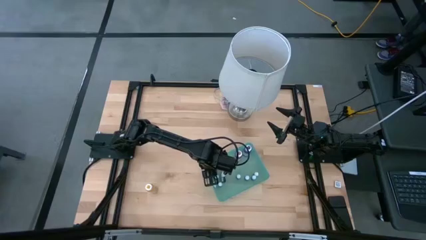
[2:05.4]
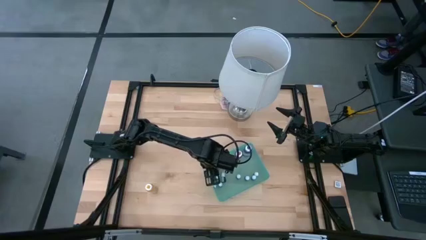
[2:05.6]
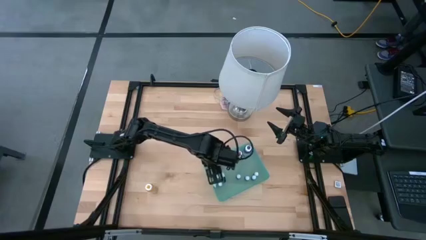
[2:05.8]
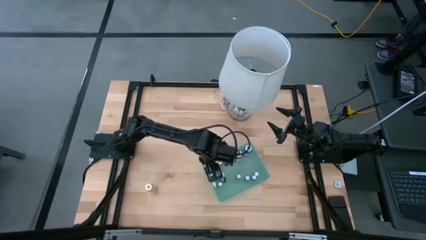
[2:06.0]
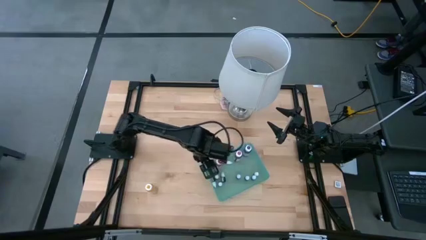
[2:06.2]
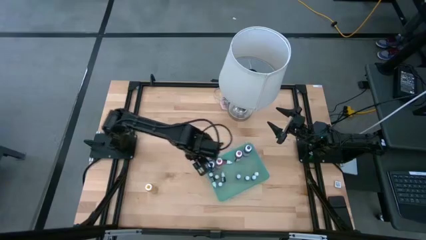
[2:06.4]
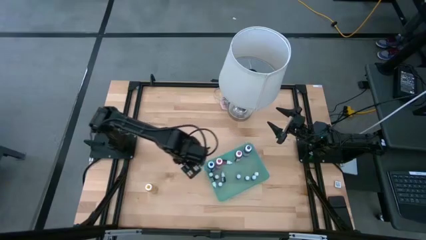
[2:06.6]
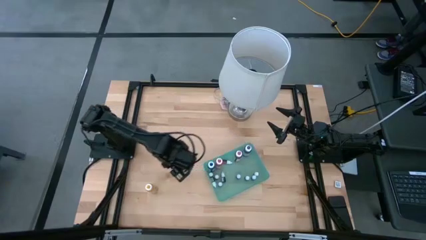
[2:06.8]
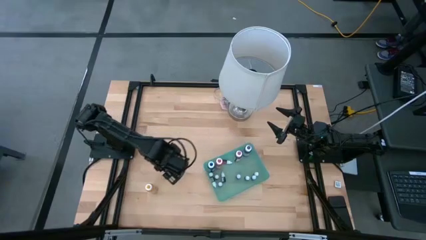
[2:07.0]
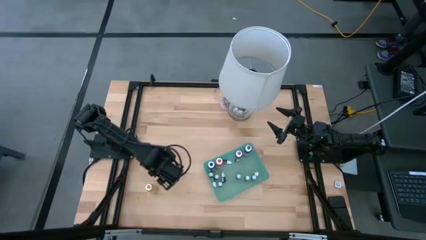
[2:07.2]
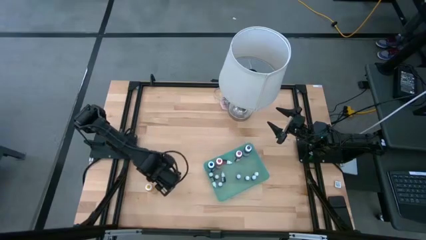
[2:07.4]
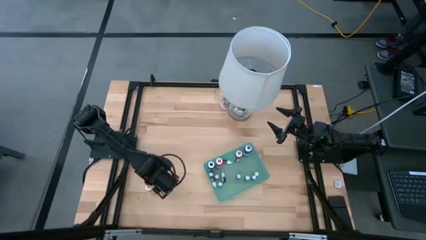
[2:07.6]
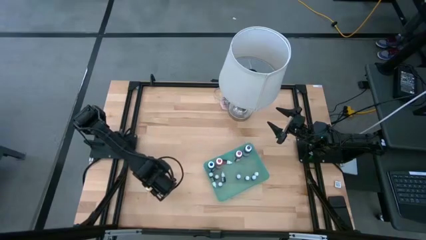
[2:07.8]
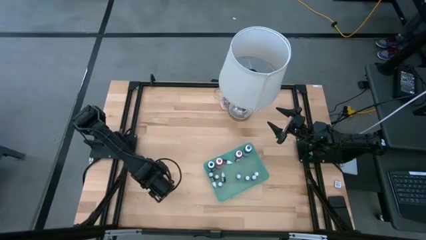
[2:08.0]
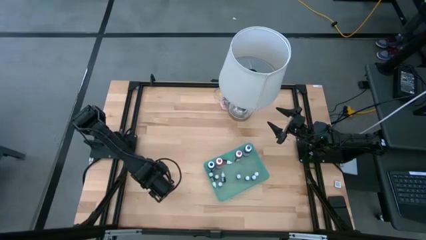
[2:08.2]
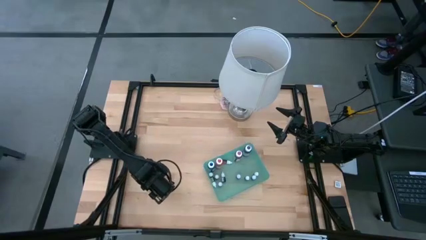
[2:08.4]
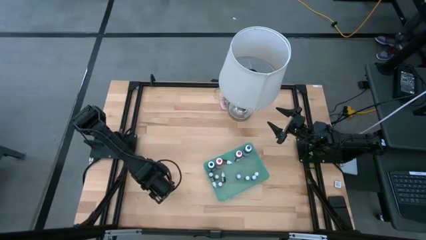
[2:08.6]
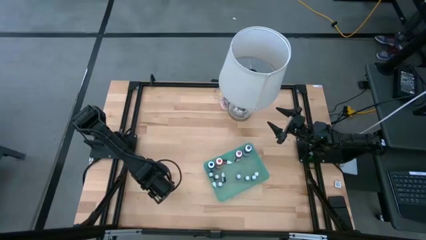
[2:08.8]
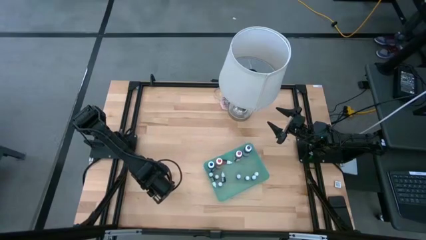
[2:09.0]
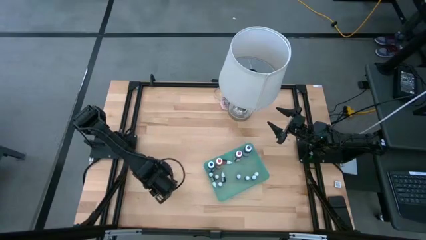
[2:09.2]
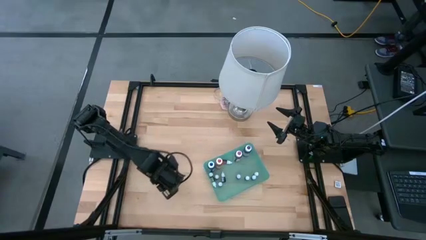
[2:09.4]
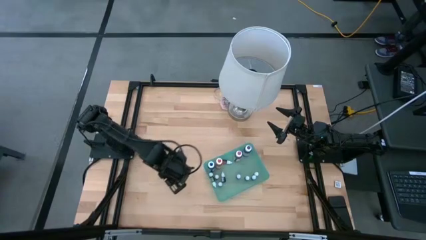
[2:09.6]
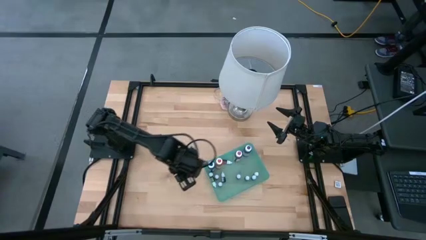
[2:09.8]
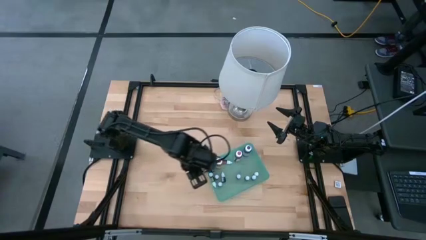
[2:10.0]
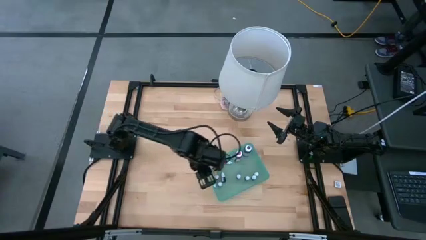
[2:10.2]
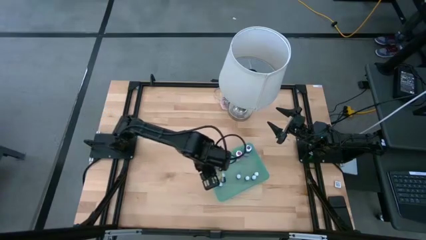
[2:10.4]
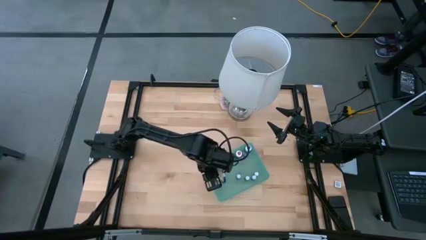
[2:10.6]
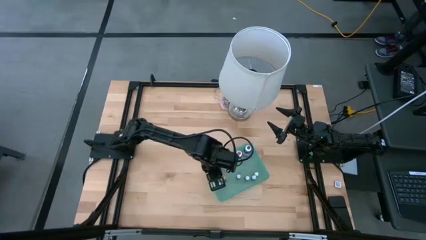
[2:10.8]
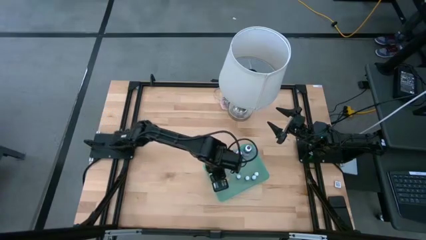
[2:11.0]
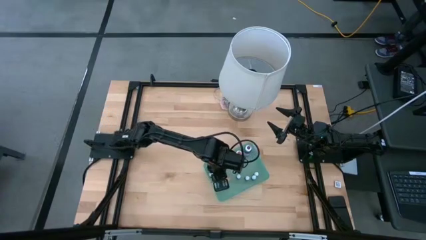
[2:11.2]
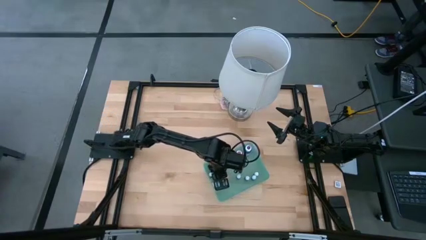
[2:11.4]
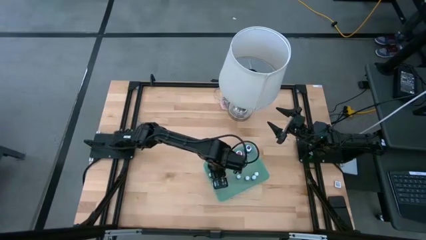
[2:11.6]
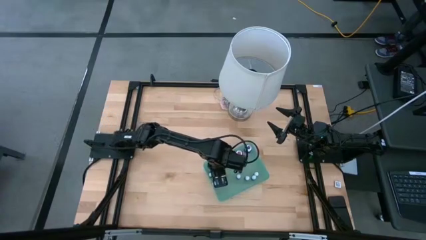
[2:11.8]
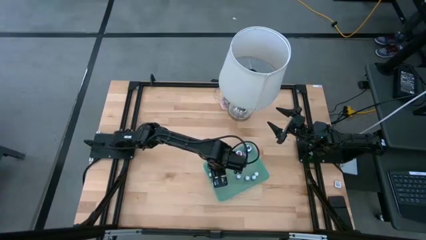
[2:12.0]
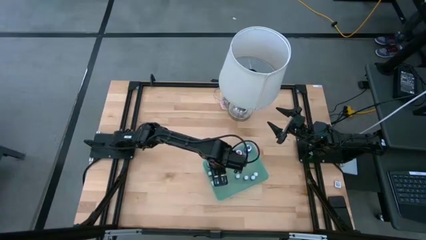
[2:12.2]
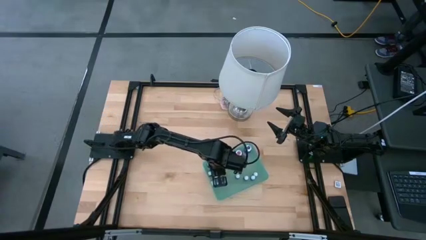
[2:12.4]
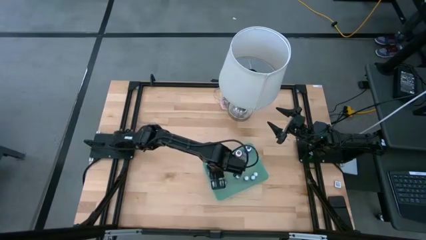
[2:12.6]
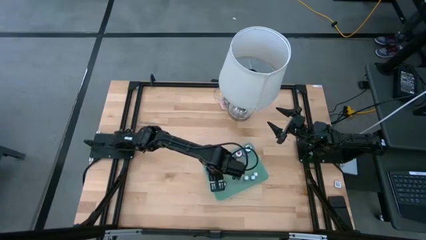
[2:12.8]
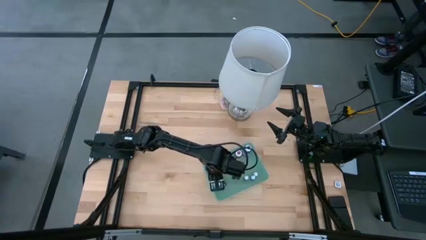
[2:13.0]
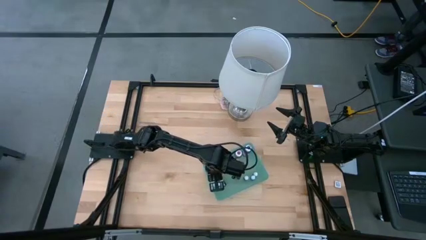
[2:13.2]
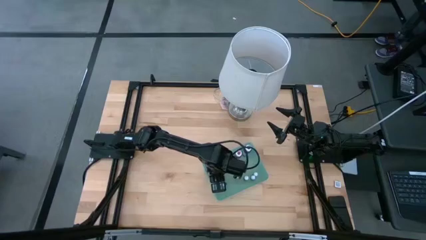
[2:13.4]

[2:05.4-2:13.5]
Task: Pick & Place food coloring
Put the large yellow coloring bottle into the green bin

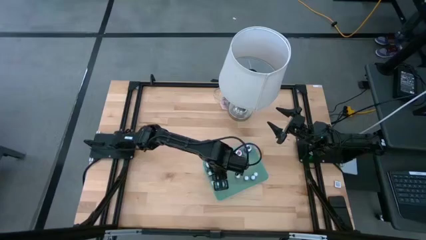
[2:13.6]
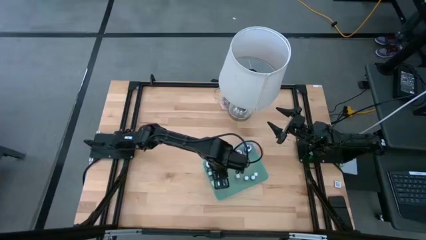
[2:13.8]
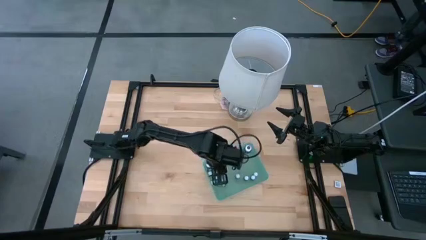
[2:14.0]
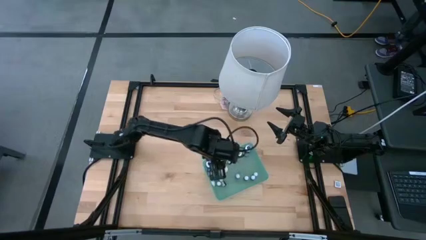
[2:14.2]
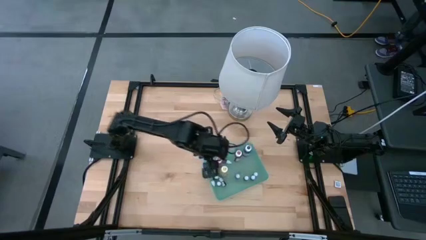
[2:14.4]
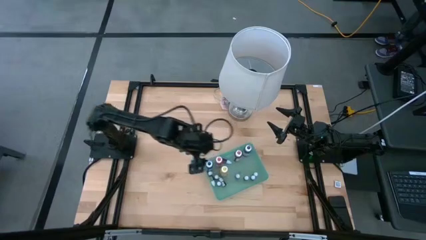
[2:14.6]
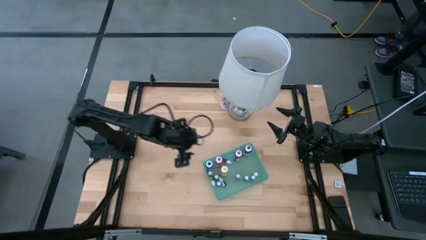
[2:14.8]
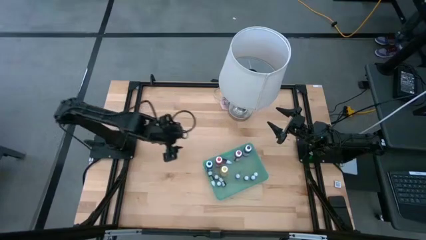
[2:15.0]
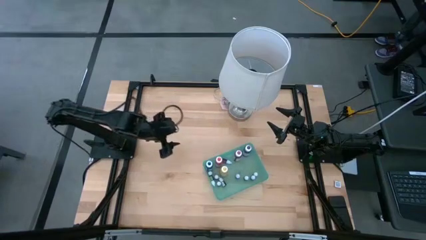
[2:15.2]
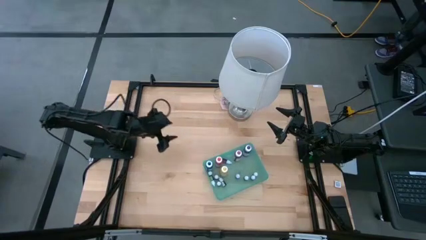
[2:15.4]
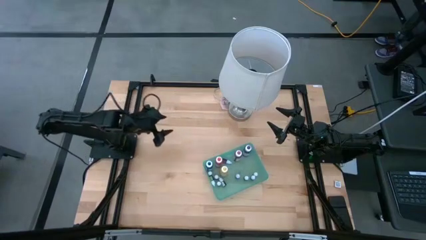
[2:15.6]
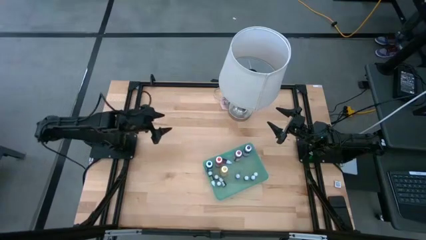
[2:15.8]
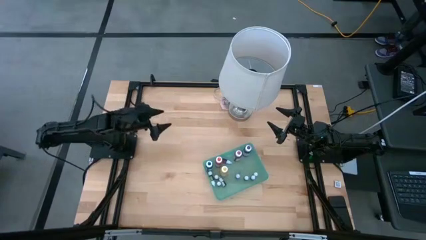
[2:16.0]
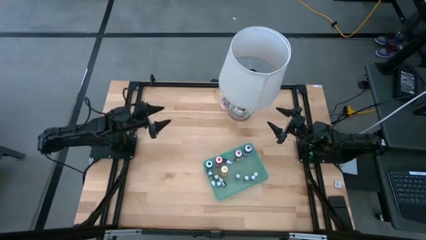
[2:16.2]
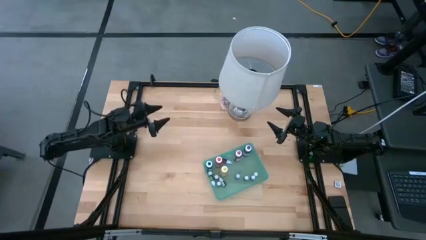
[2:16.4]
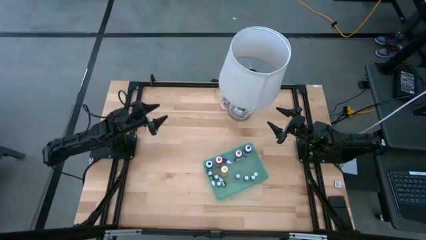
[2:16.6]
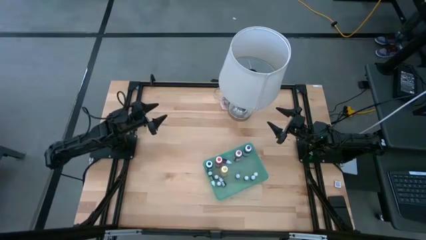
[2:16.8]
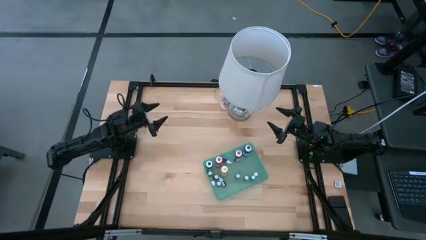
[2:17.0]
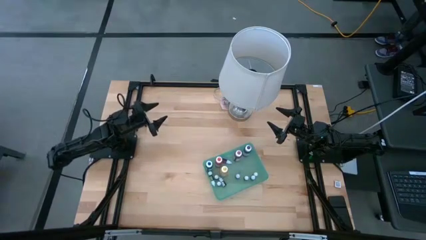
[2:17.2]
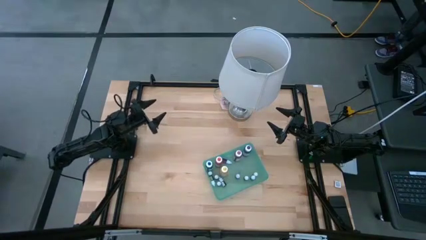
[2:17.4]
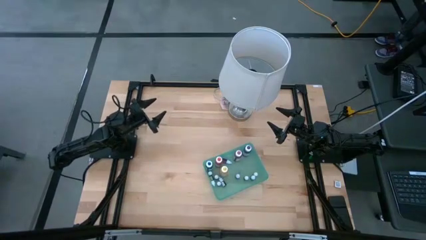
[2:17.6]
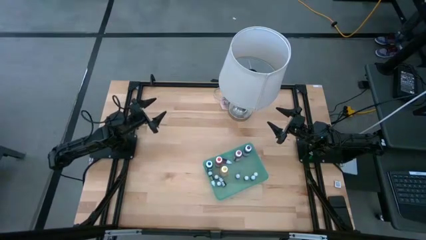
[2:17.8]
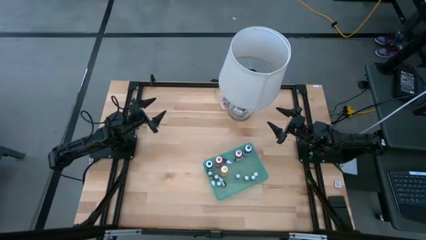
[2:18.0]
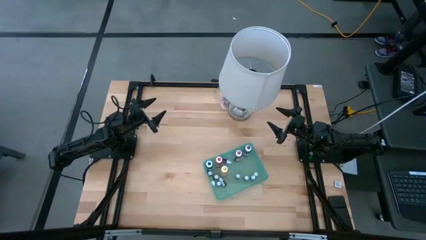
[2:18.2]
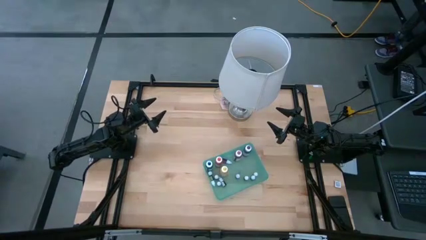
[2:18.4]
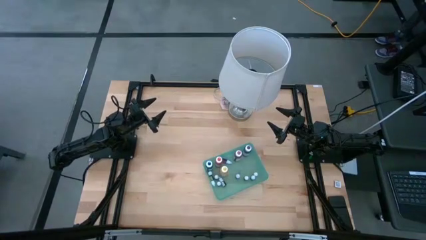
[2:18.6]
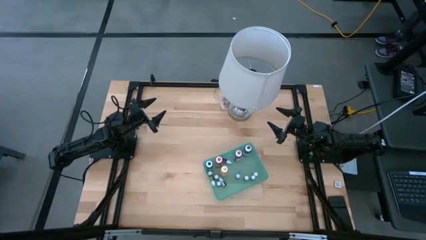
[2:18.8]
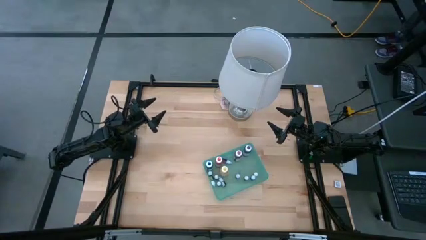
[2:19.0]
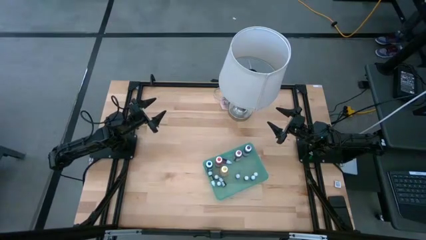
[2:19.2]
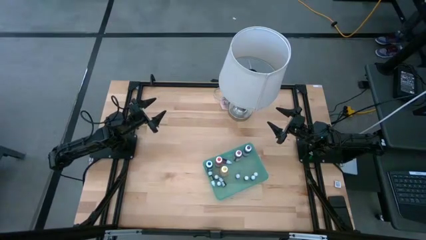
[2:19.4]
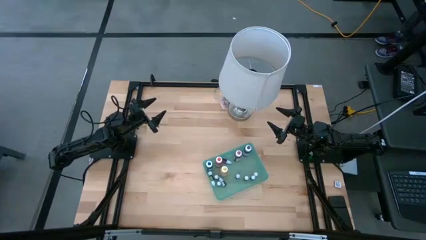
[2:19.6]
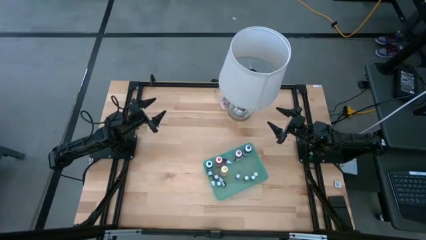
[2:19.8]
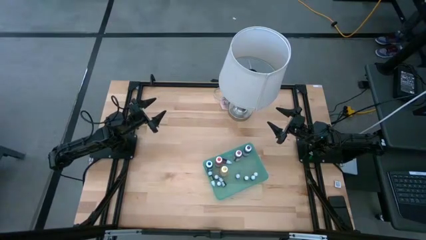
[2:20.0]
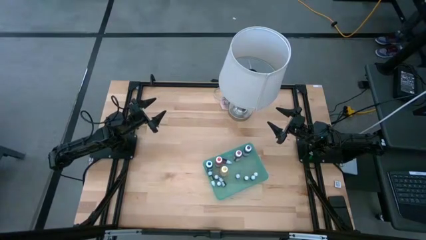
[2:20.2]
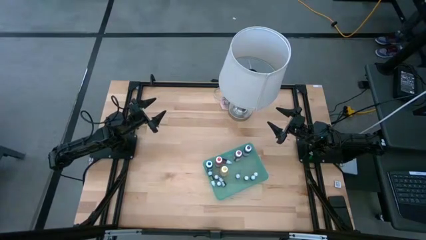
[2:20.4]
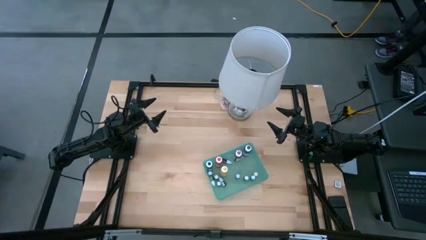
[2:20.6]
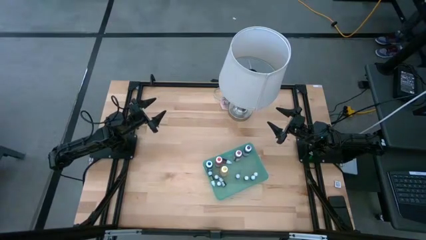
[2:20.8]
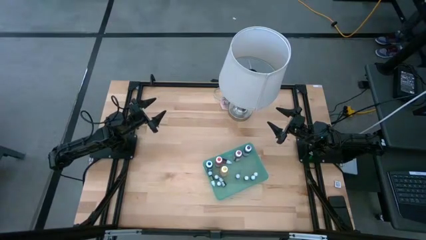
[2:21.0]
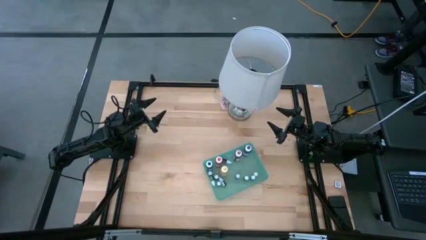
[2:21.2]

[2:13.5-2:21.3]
Return to Home Position
